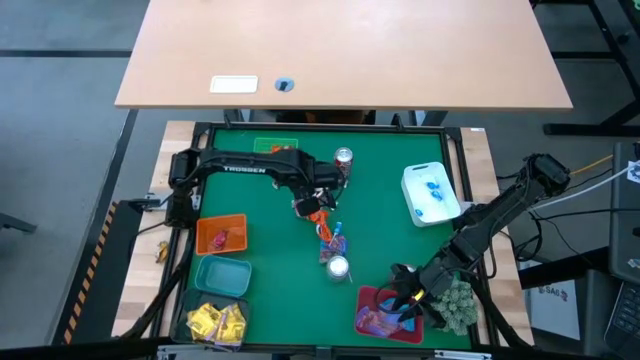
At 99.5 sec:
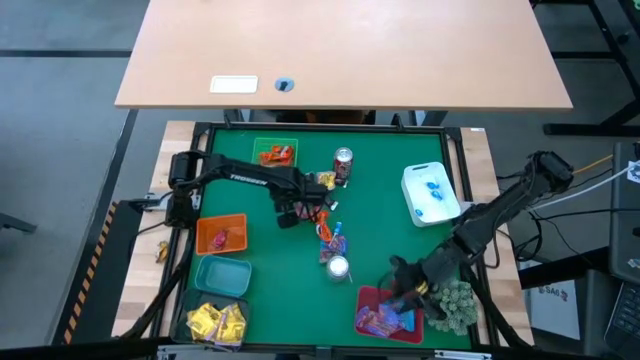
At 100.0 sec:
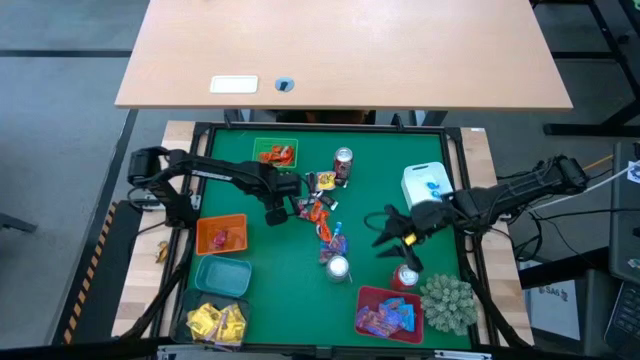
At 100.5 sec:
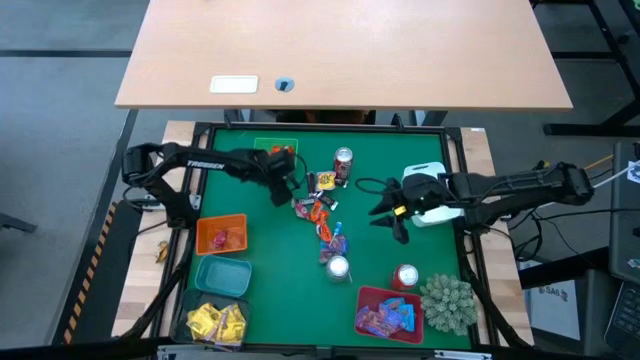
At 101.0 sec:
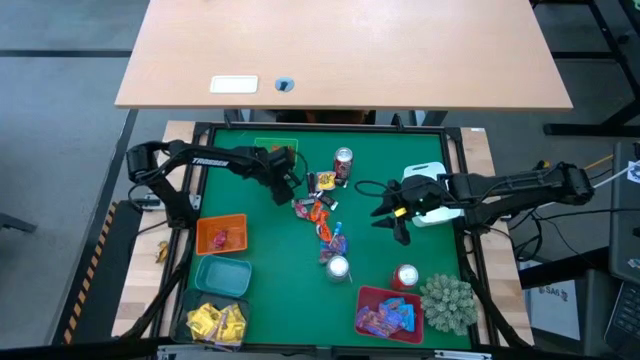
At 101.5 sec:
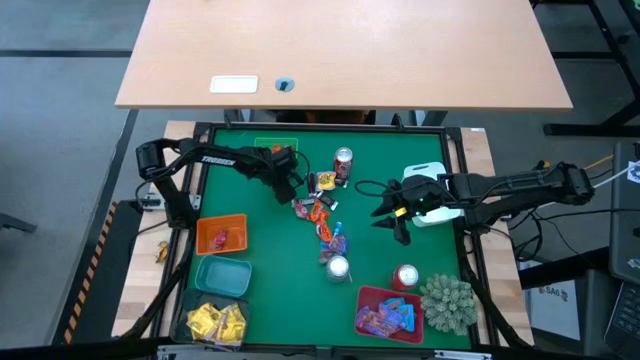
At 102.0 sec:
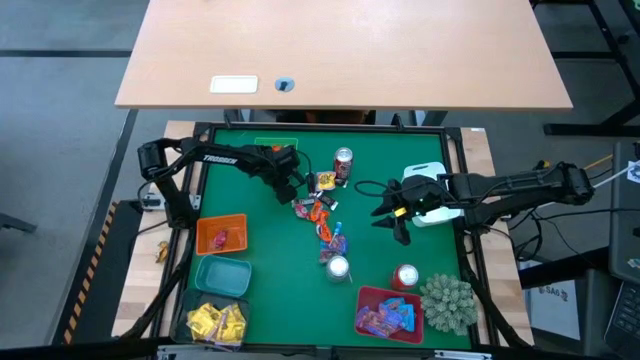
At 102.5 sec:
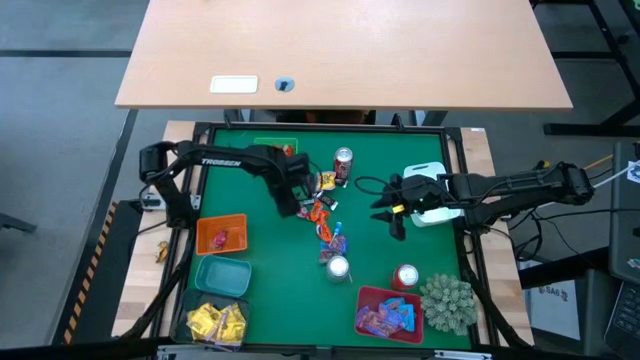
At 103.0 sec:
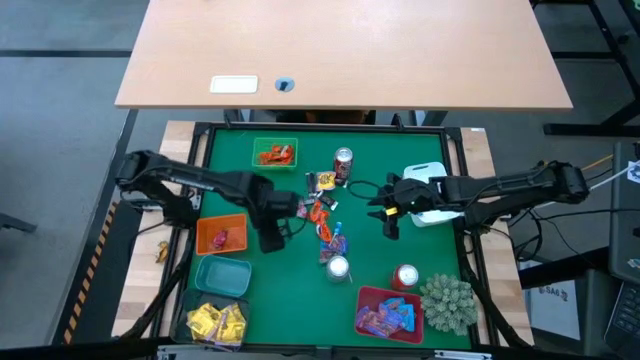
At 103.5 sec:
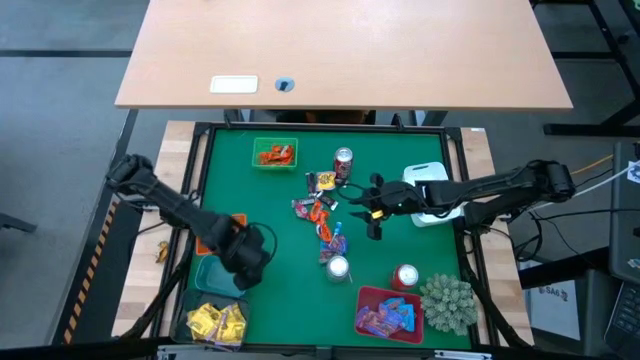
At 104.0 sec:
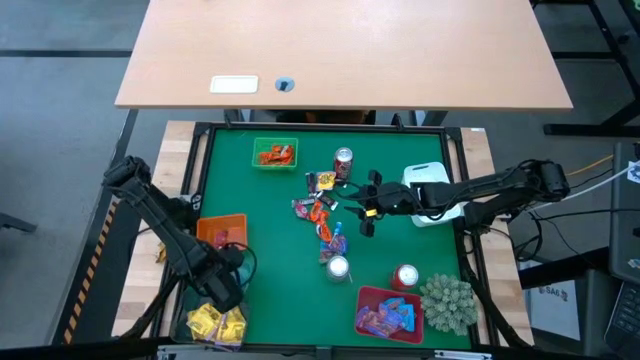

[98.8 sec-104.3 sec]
Task: Sort candy
Put the brown chocolate into the blue bin

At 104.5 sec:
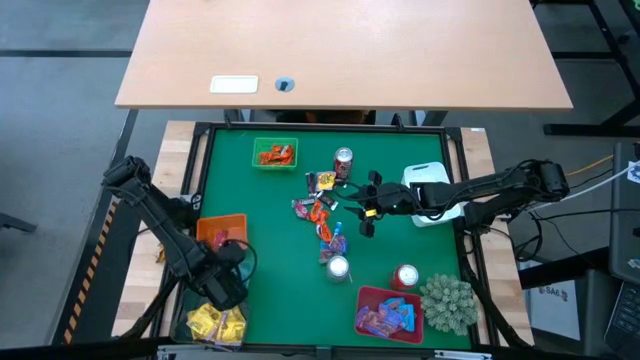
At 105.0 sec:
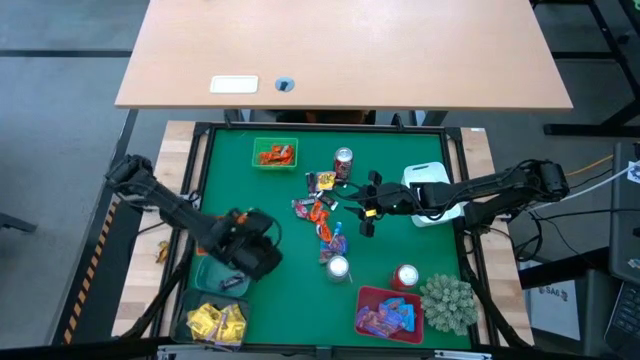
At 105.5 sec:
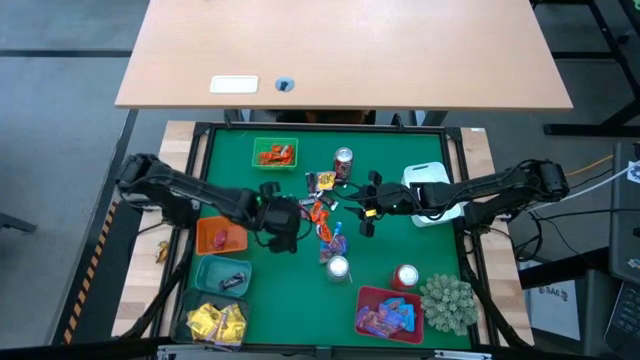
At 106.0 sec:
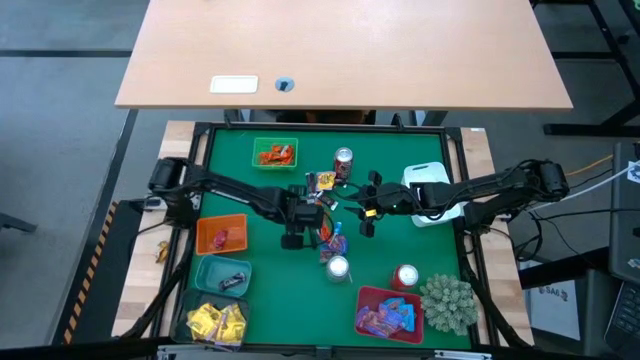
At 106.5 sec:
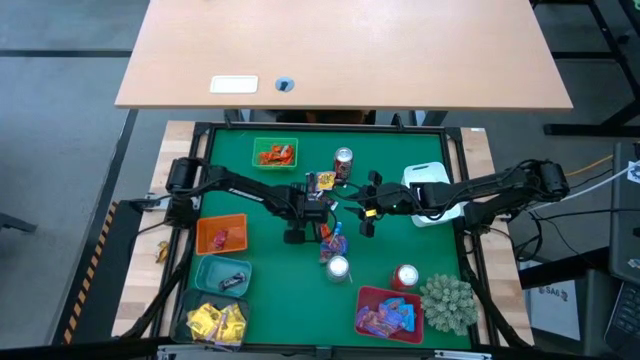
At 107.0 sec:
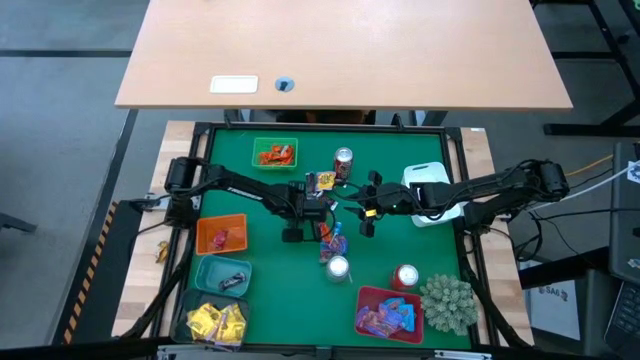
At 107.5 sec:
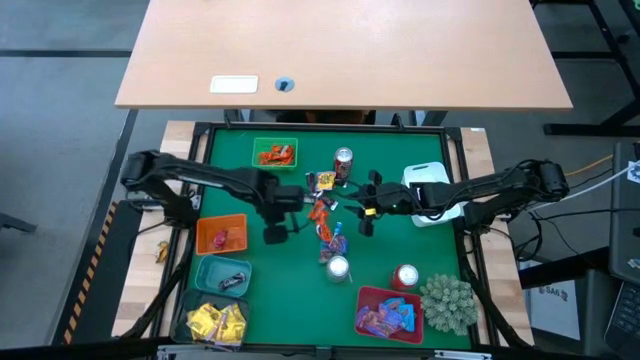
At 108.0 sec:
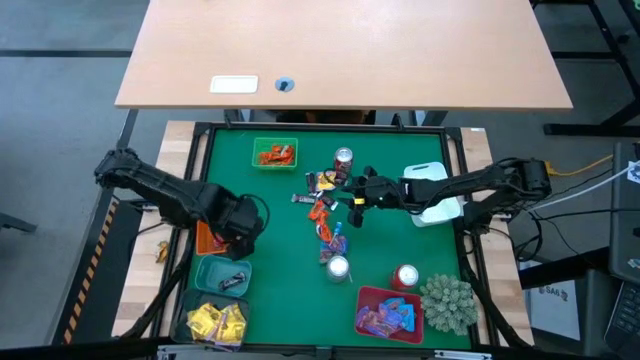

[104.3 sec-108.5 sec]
Put the pink candy into the orange bin

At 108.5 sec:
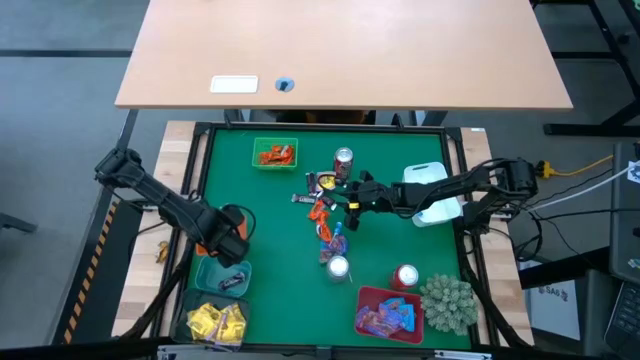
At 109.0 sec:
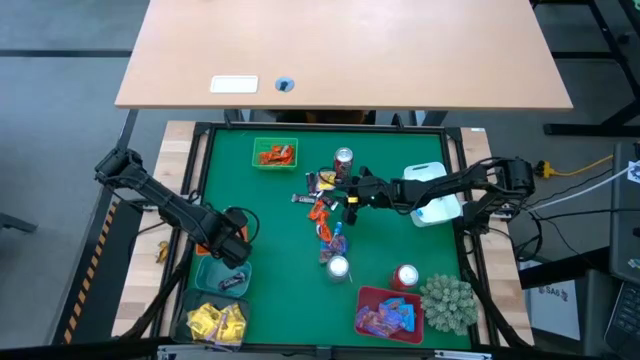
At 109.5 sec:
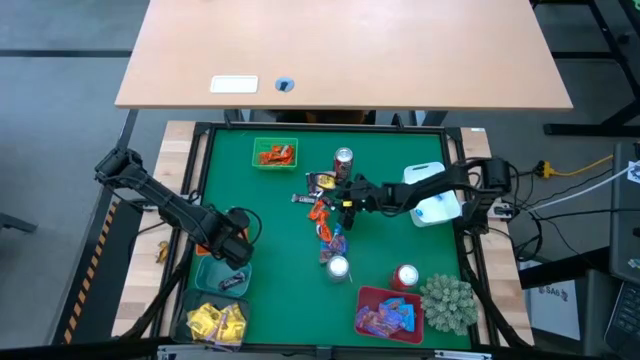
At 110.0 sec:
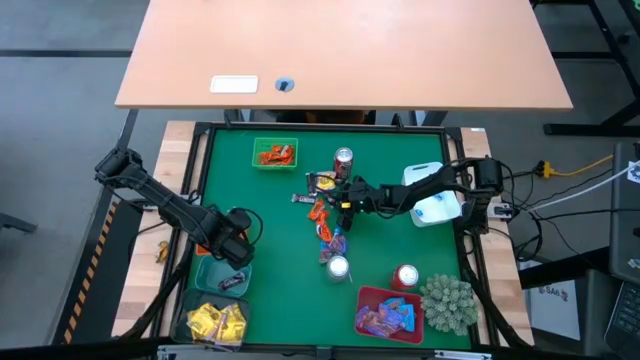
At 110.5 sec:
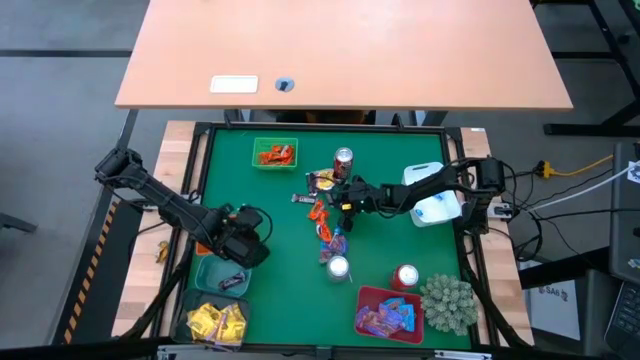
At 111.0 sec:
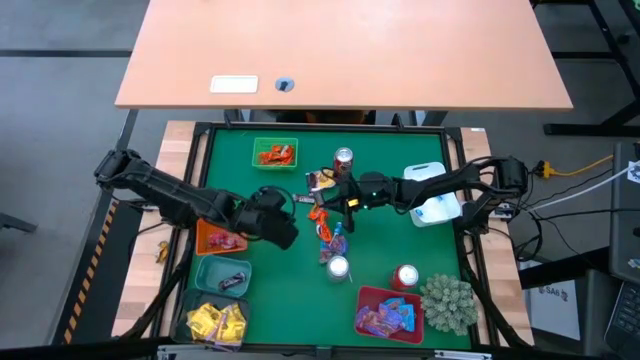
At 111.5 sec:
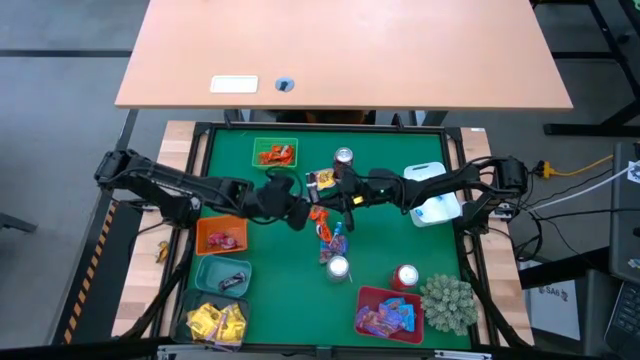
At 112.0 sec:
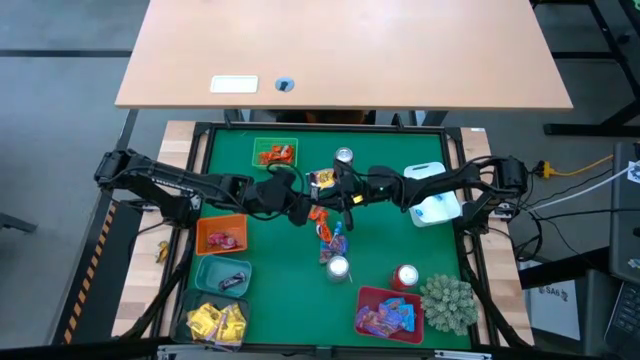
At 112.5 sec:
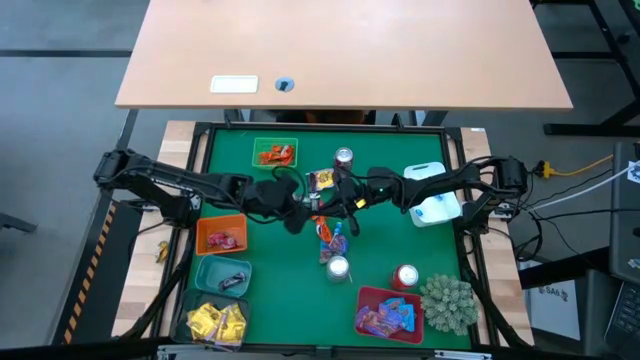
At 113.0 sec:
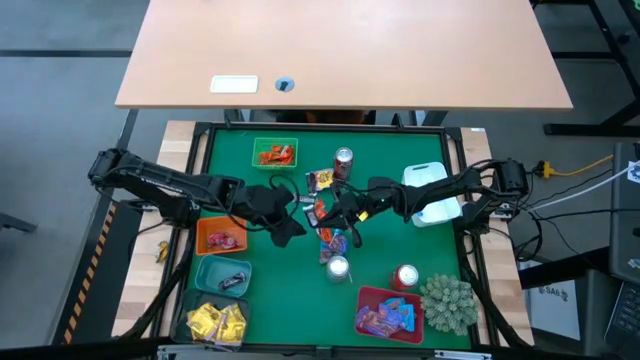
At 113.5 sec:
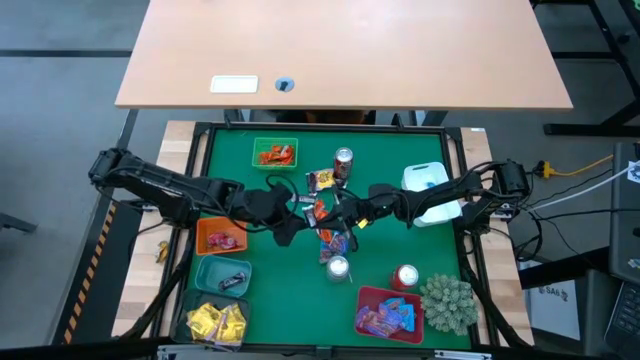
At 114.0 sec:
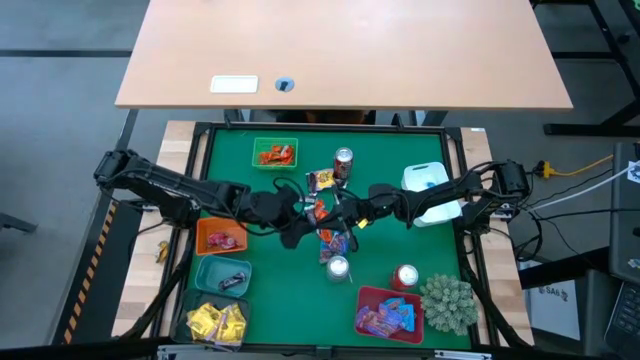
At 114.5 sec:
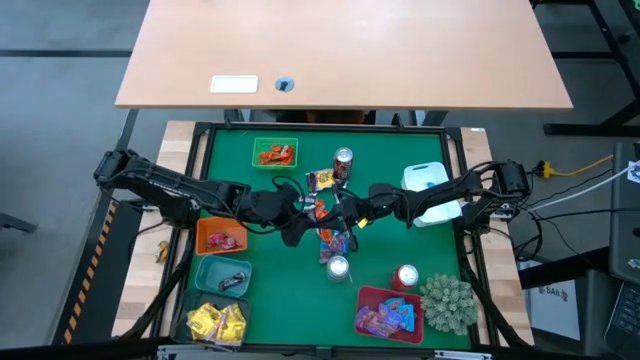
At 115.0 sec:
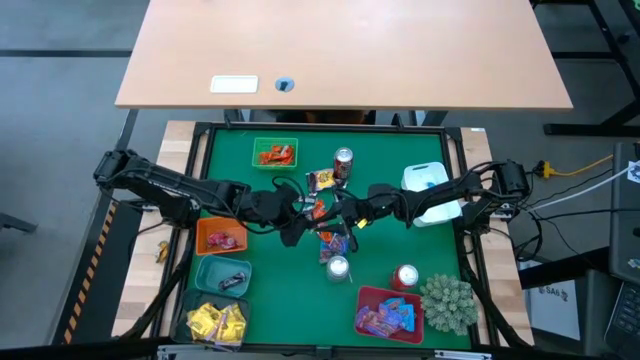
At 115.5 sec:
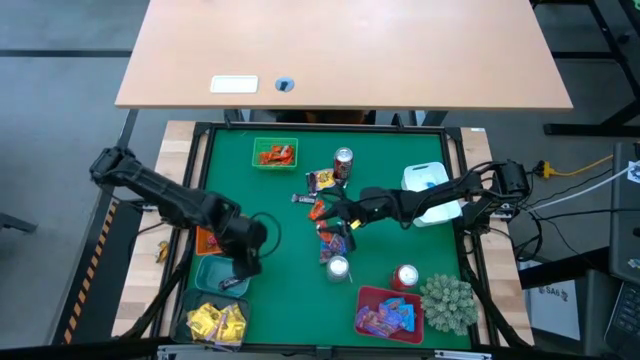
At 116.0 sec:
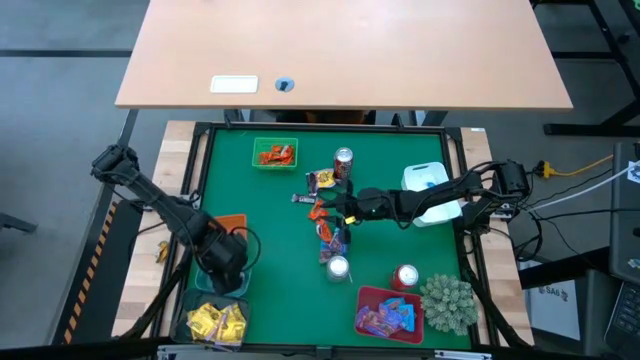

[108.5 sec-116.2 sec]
Put the brown chocolate into the blue bin

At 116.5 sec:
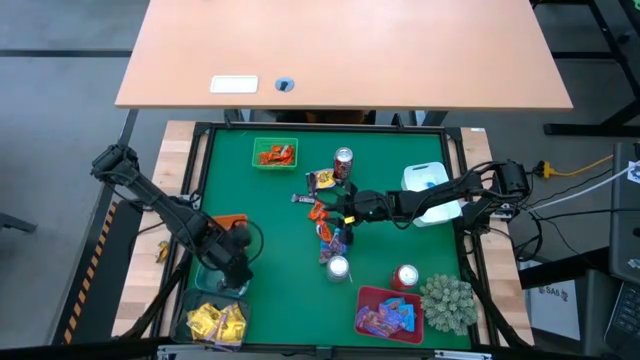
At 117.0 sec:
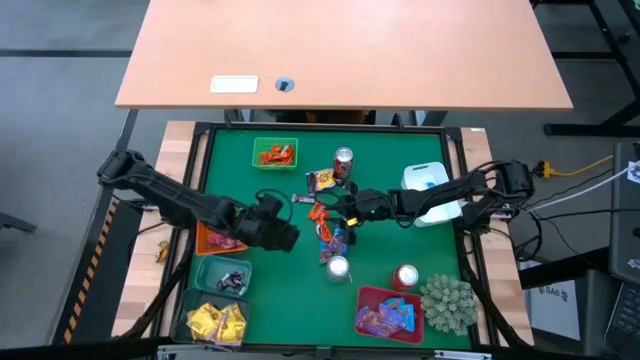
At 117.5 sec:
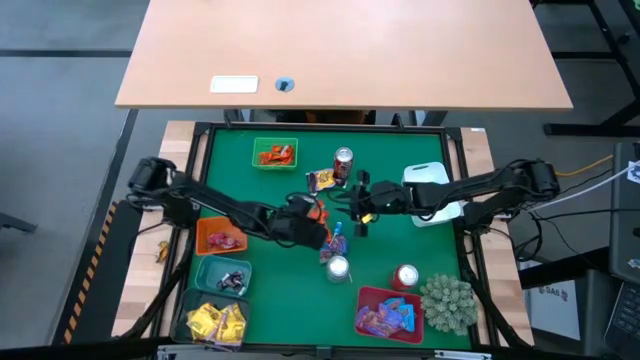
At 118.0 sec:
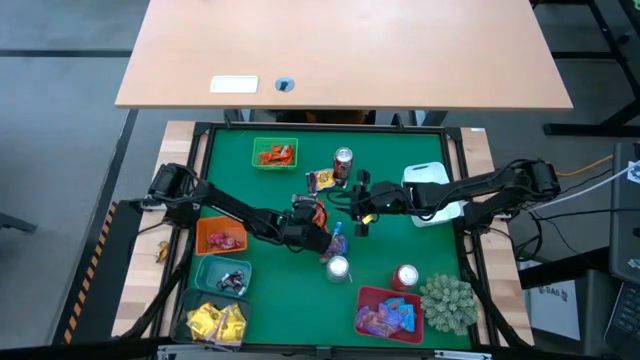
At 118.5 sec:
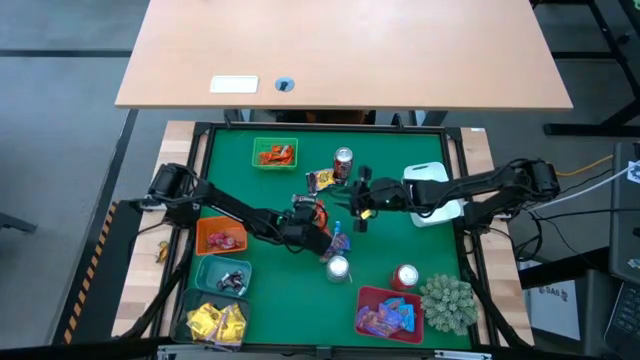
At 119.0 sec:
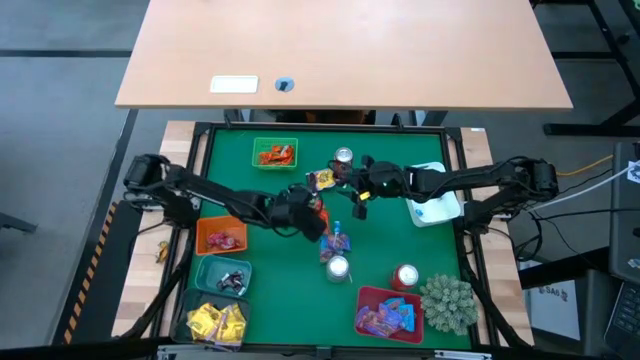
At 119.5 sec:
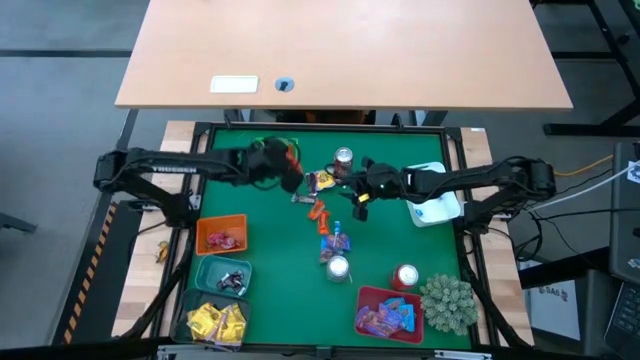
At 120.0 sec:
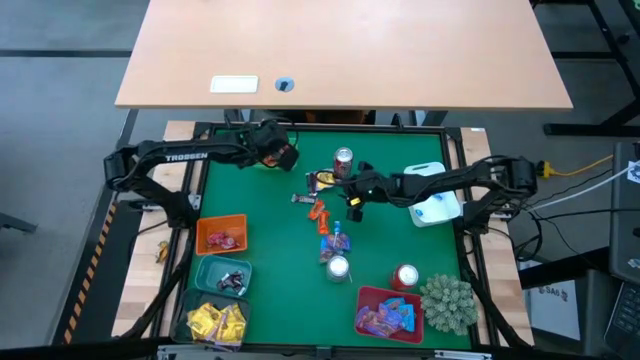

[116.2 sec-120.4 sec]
Put the orange chocolate into the green bin
